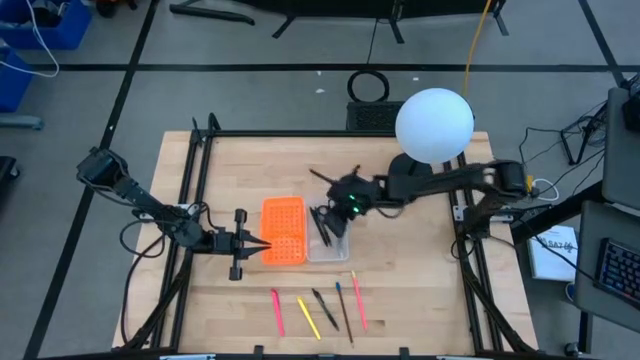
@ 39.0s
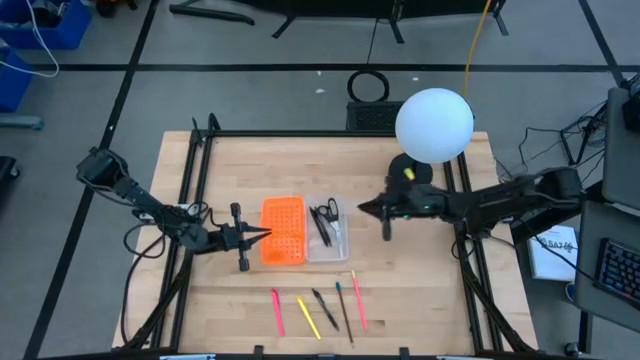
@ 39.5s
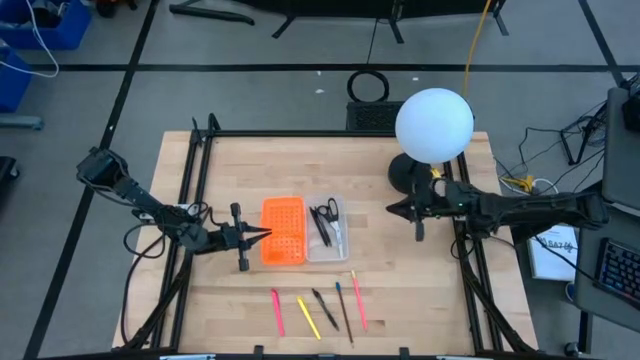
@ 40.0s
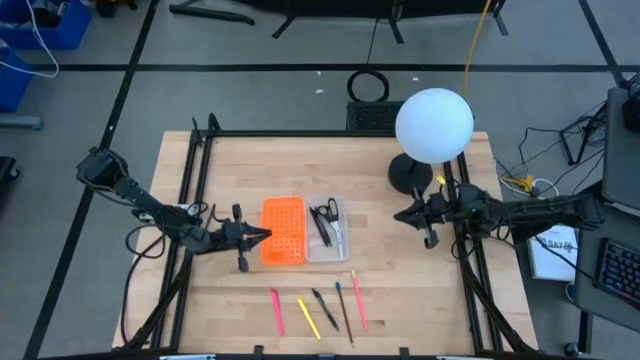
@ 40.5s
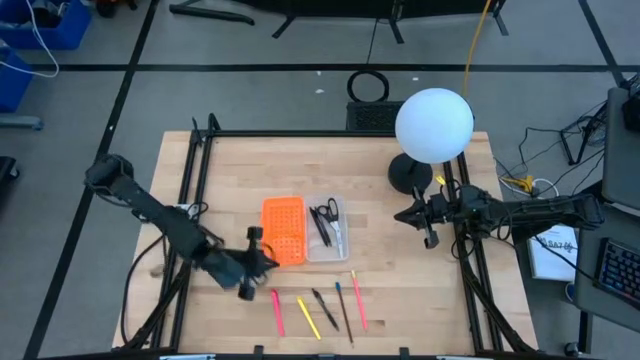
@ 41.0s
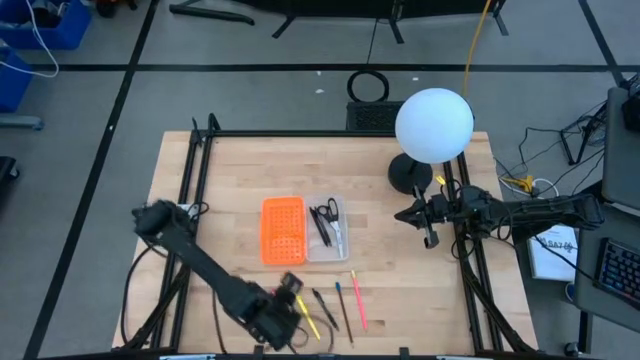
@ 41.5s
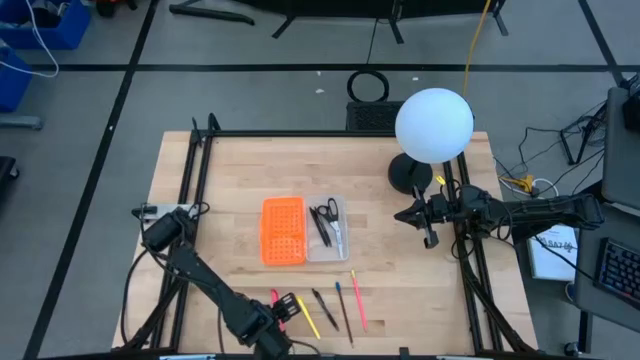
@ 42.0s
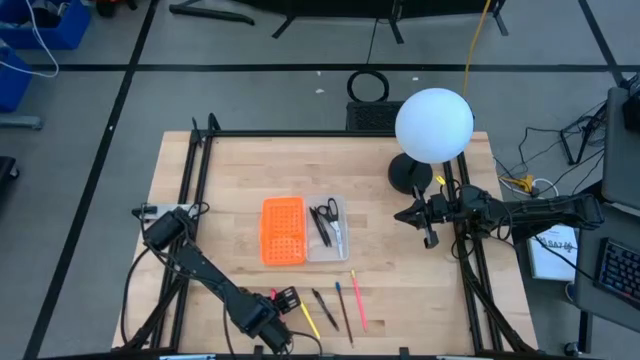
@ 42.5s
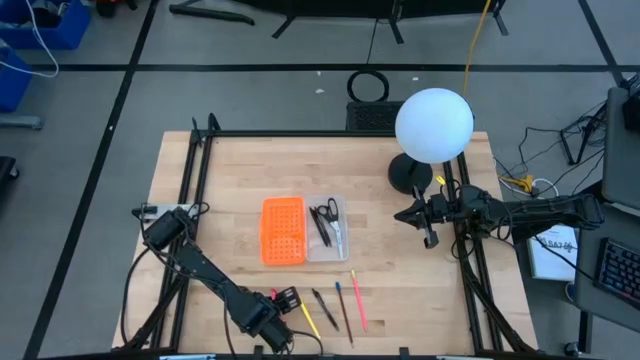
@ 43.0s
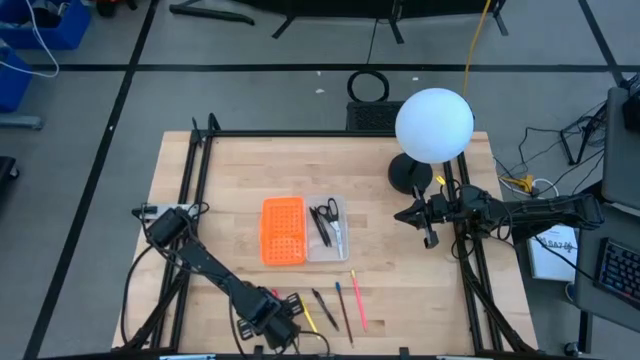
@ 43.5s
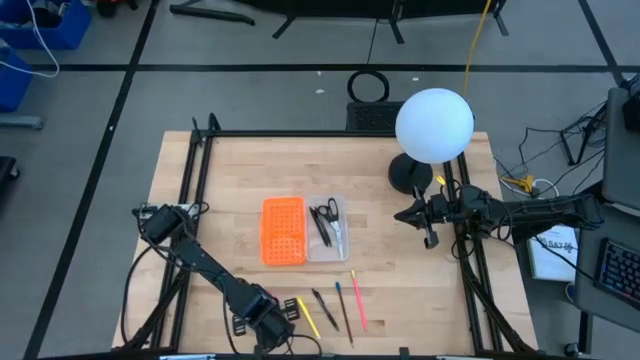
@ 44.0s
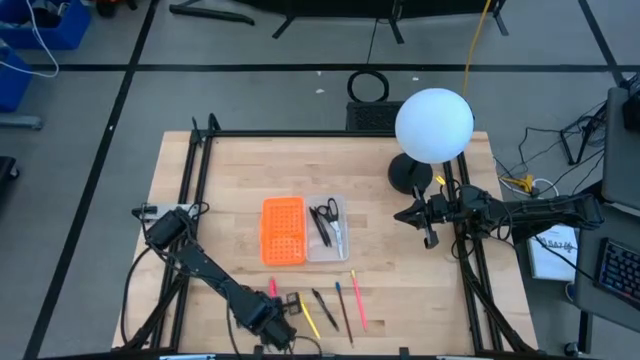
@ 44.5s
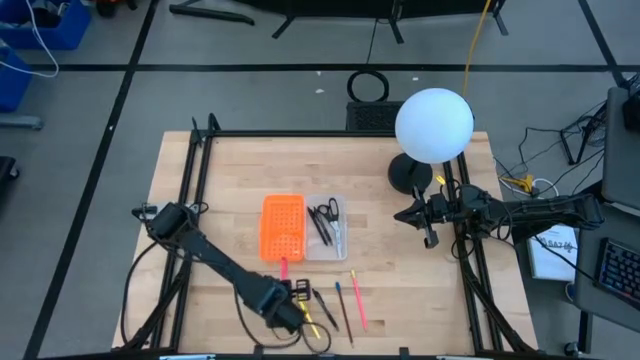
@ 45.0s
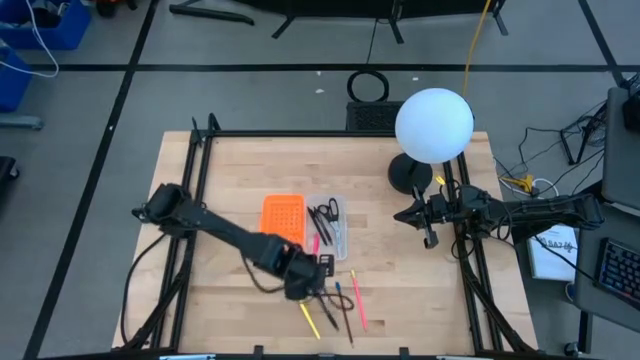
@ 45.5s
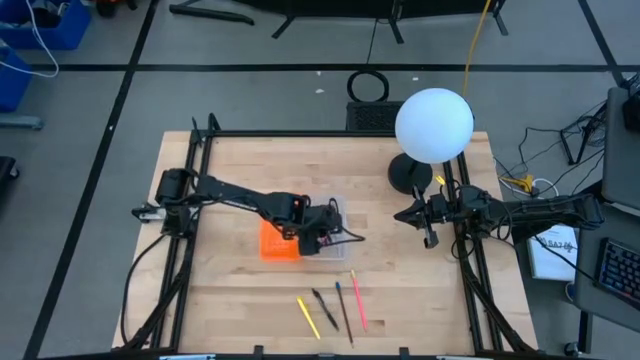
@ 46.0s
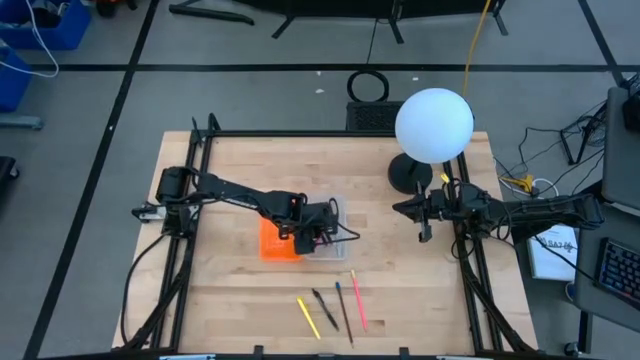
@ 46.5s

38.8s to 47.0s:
Task: Pick & place school supplies into a supply box
Put the pink pen into the transparent supply box

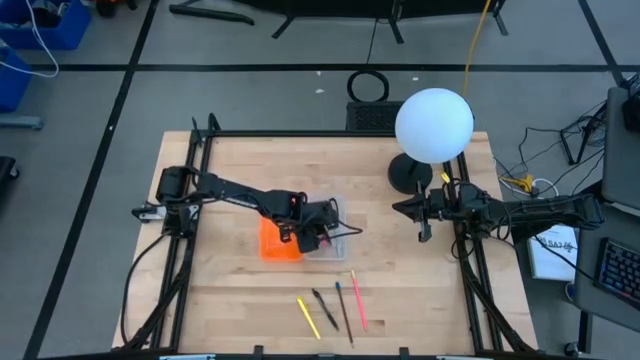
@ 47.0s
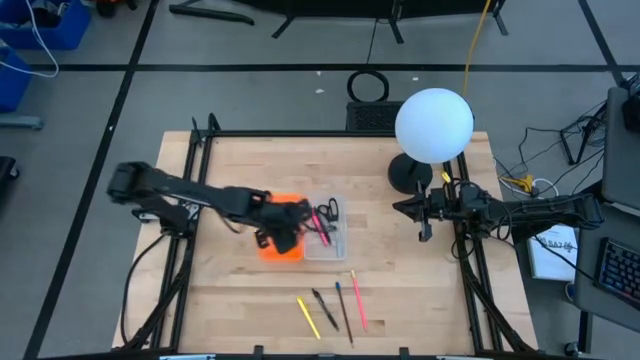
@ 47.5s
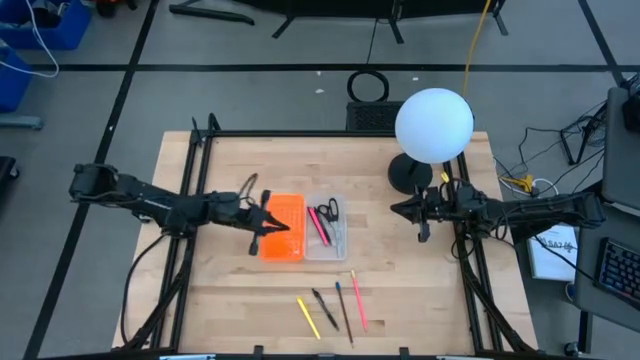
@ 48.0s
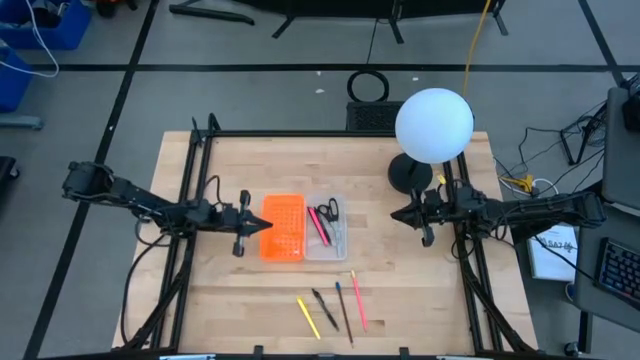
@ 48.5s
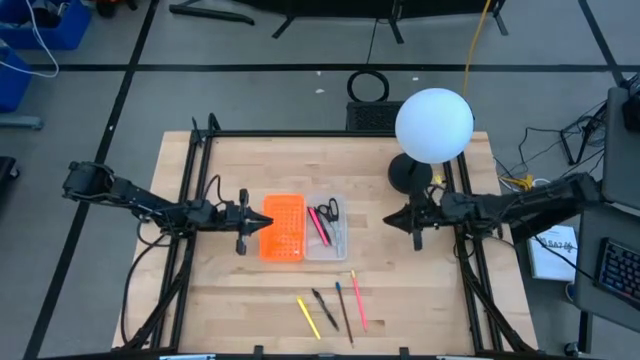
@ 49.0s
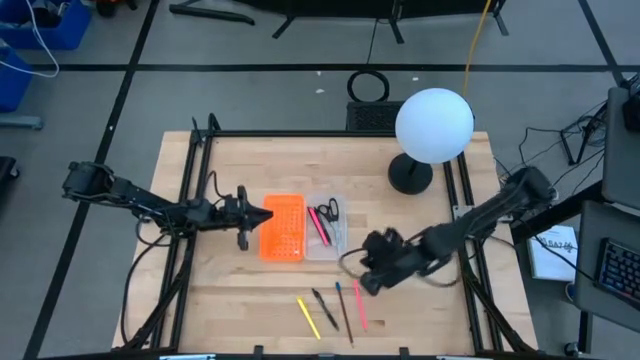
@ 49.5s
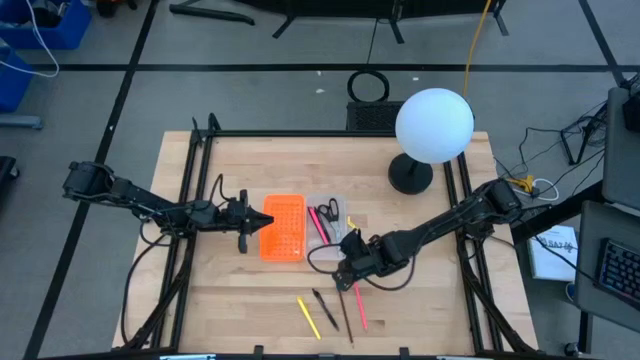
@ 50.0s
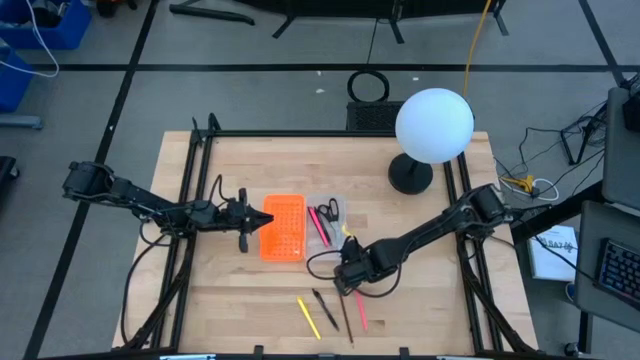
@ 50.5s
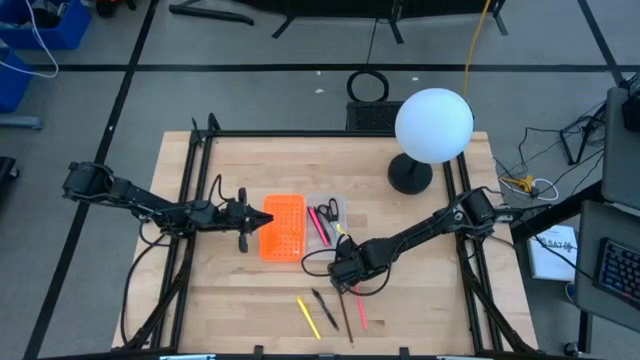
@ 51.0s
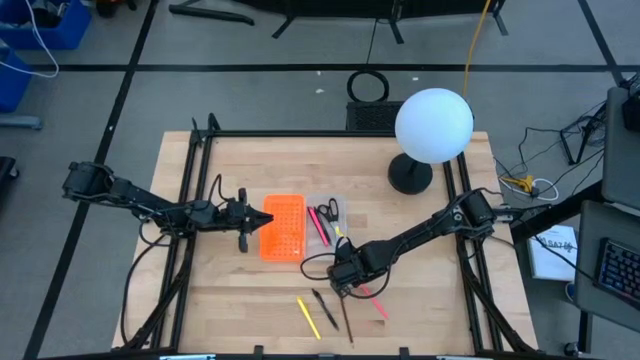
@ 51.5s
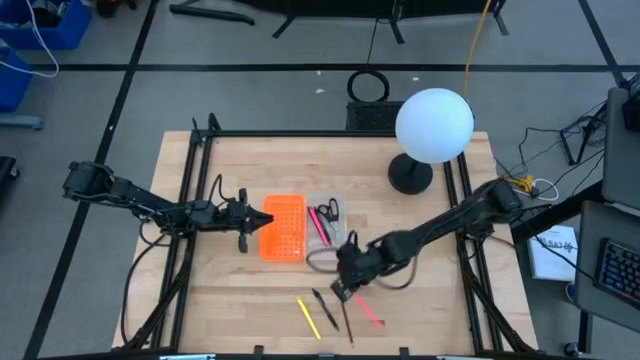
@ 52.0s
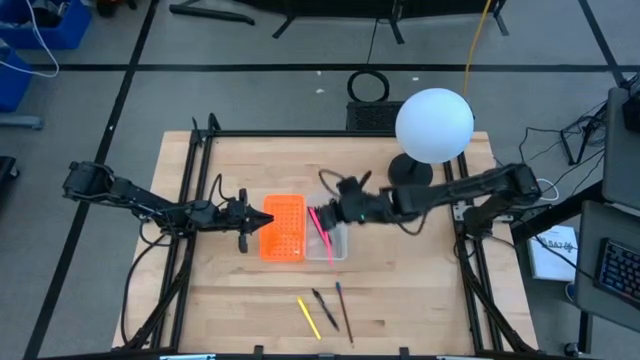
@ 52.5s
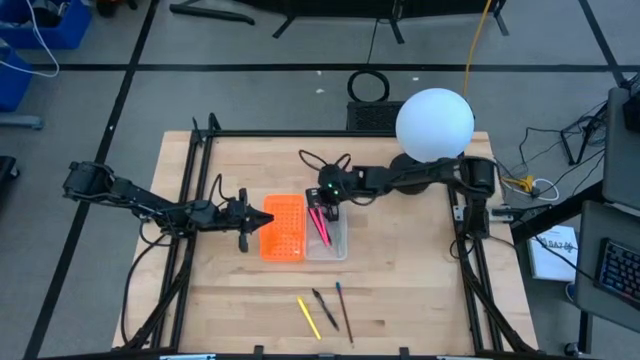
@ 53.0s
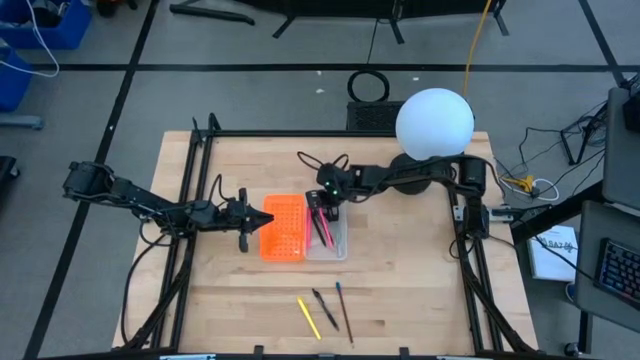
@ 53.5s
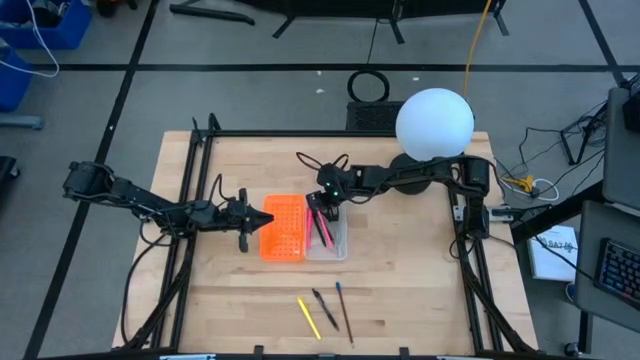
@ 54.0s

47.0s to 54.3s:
Put the pink pencil into the transparent supply box

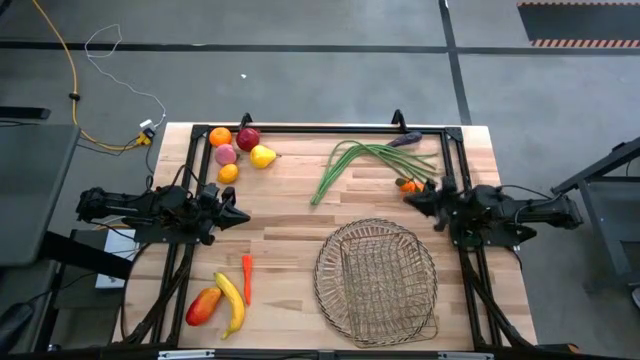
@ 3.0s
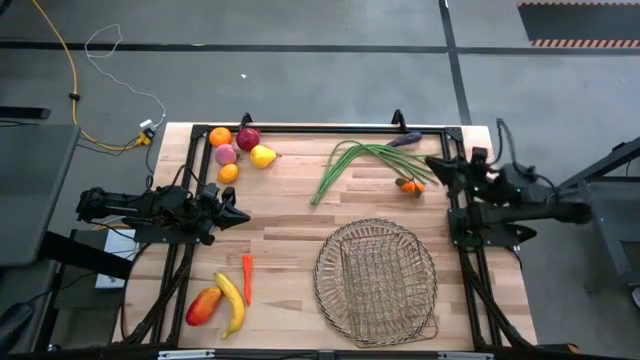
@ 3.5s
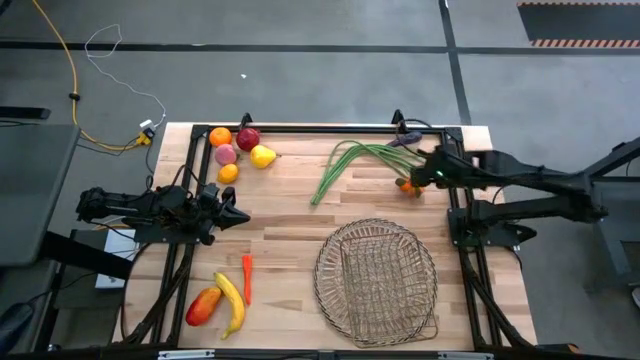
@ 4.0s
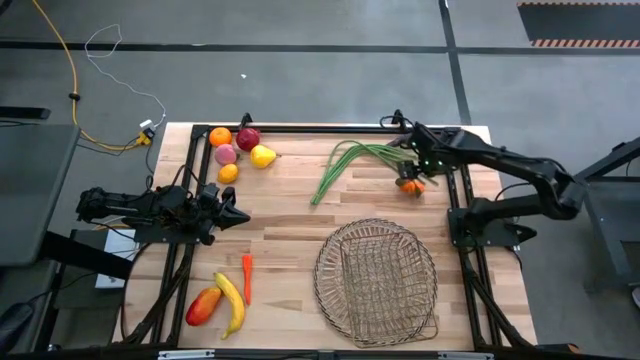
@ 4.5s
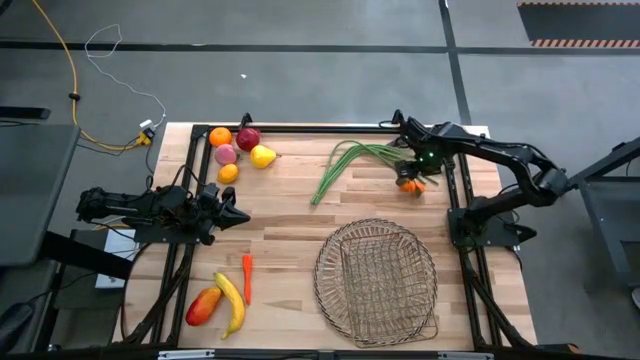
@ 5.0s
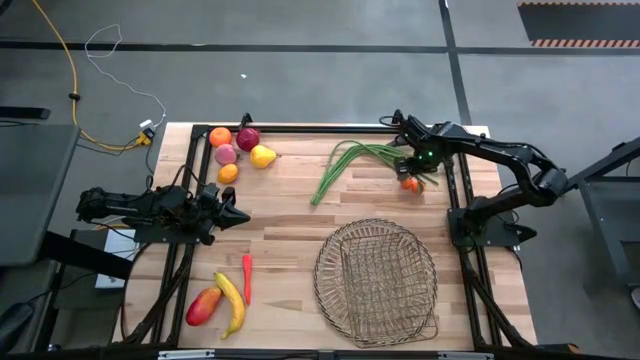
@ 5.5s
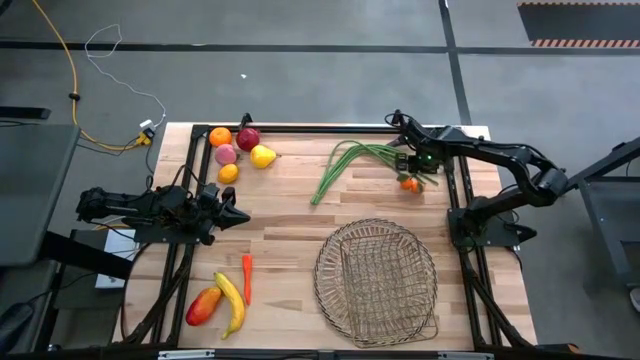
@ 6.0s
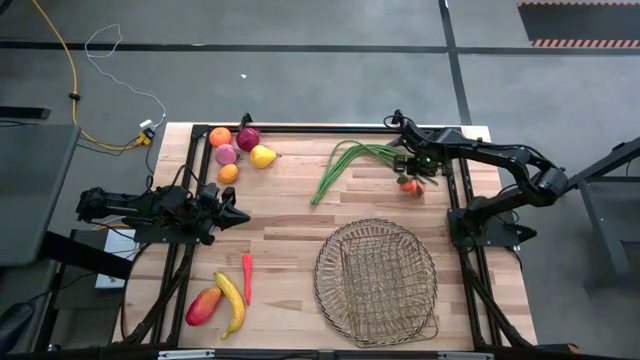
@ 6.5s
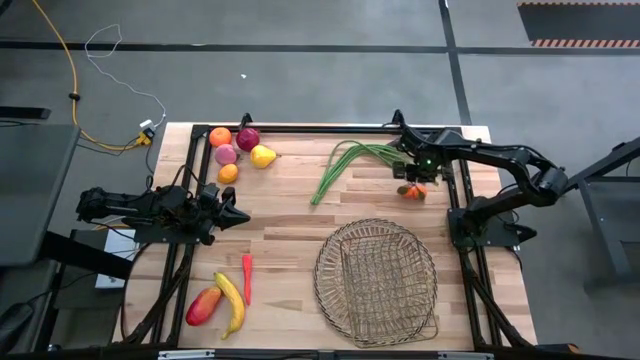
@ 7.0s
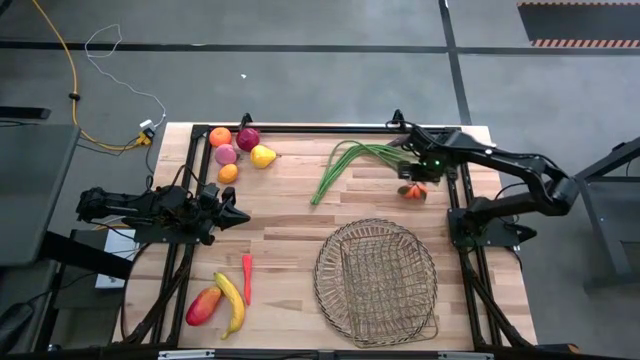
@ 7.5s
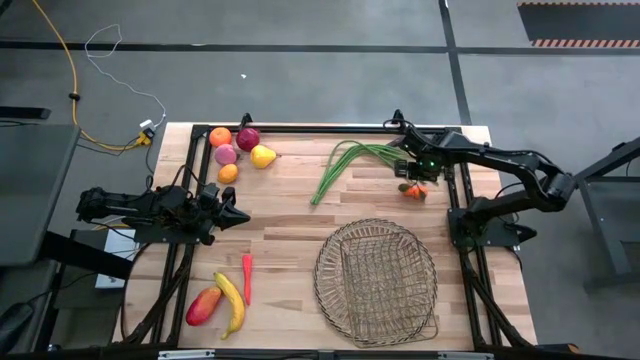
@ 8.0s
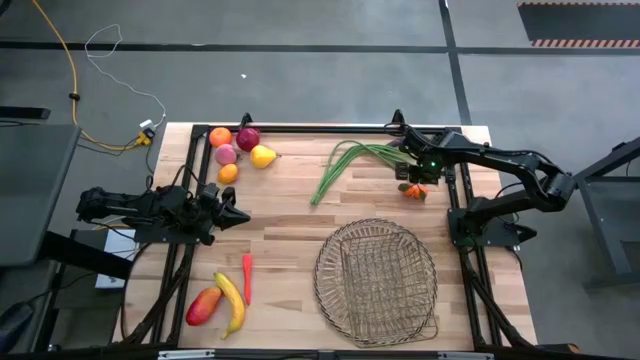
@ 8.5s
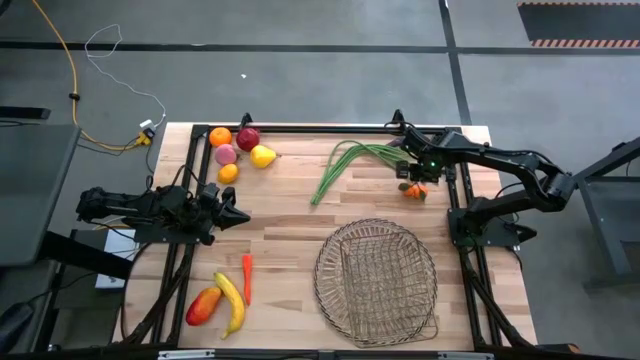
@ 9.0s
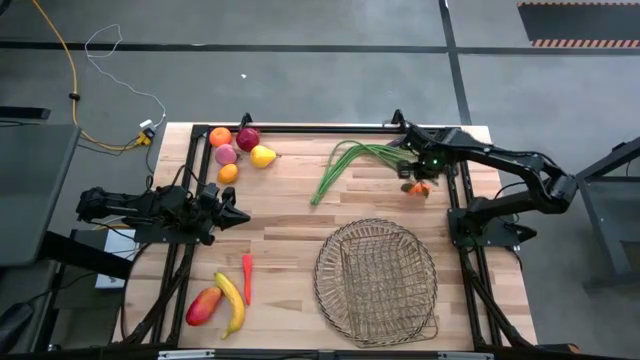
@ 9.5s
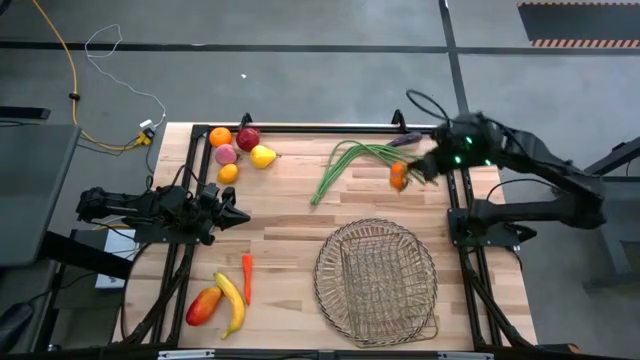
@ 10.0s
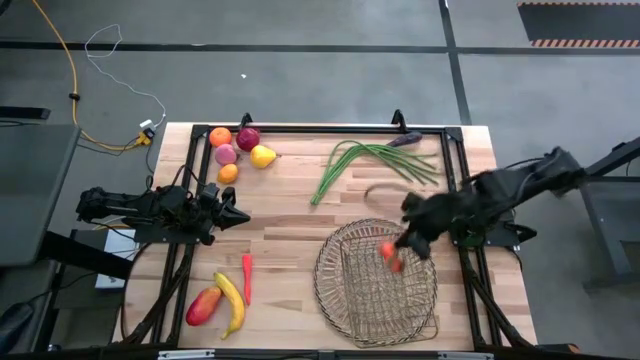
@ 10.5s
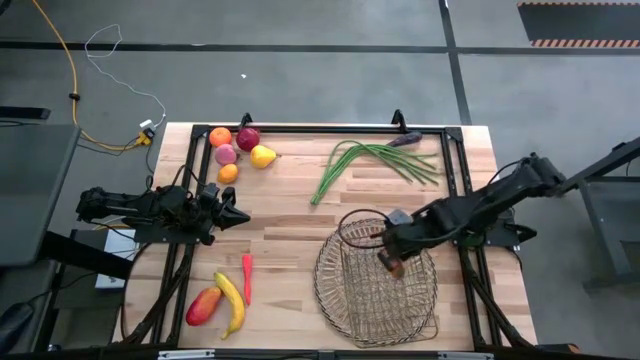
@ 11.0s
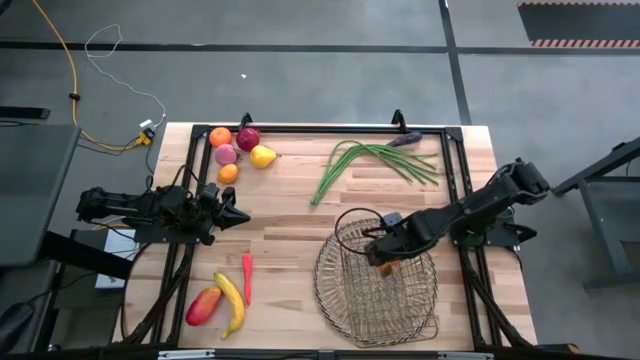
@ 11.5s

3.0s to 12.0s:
Task: Build produce basket
Put the tangerine into the wire basket
